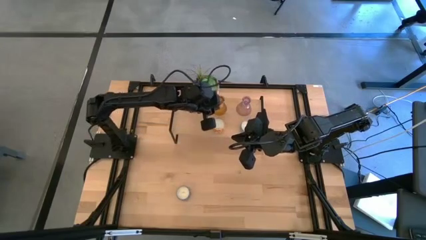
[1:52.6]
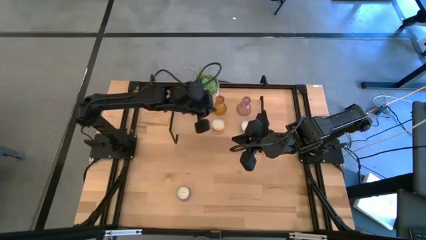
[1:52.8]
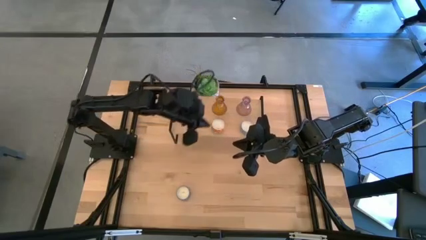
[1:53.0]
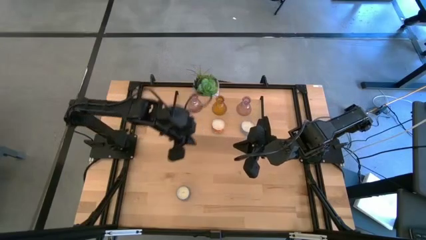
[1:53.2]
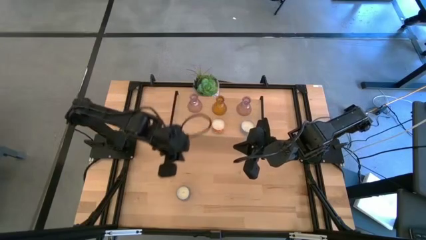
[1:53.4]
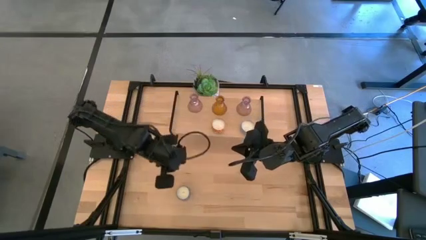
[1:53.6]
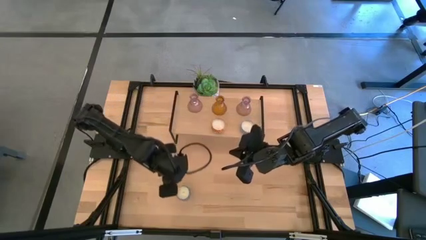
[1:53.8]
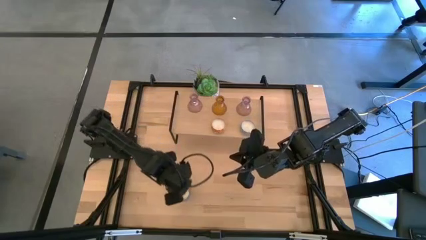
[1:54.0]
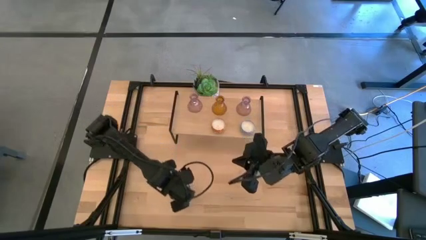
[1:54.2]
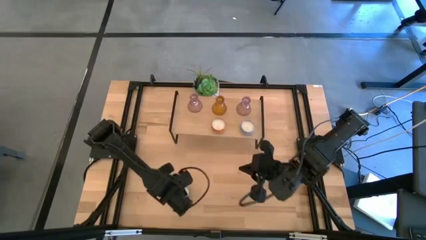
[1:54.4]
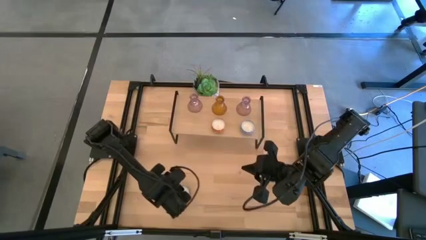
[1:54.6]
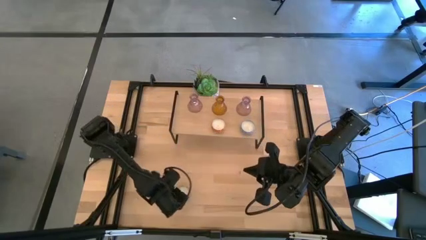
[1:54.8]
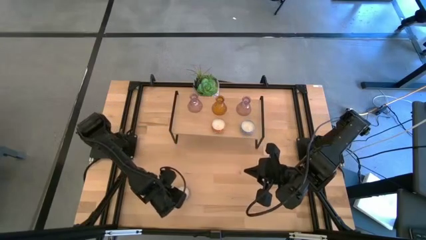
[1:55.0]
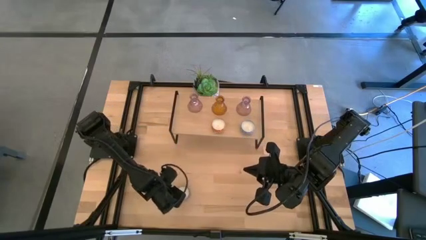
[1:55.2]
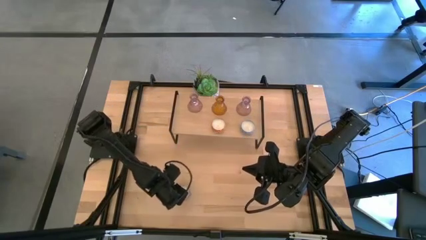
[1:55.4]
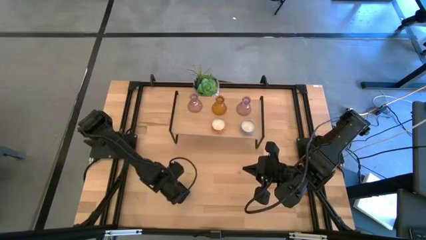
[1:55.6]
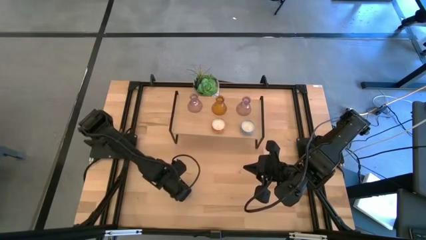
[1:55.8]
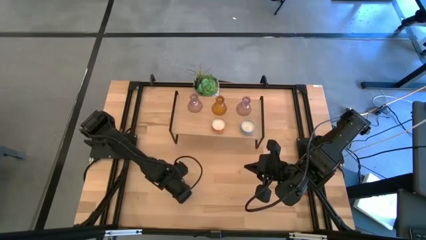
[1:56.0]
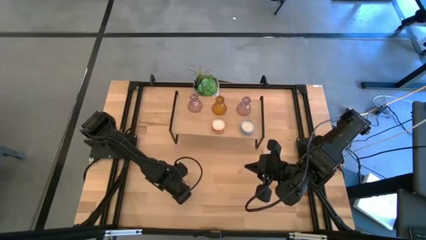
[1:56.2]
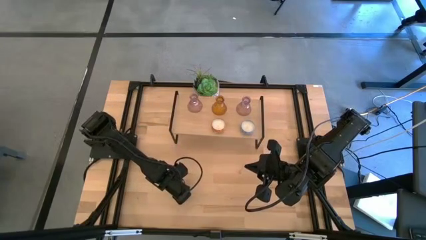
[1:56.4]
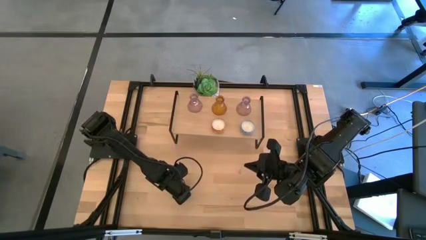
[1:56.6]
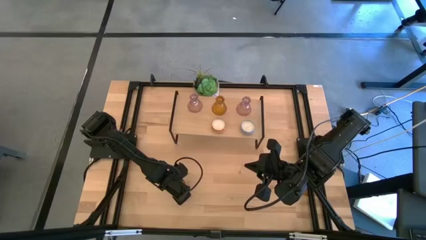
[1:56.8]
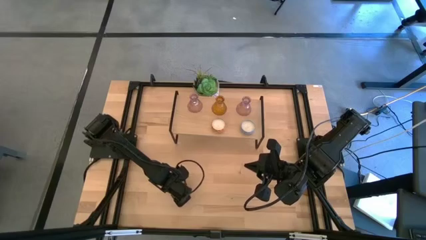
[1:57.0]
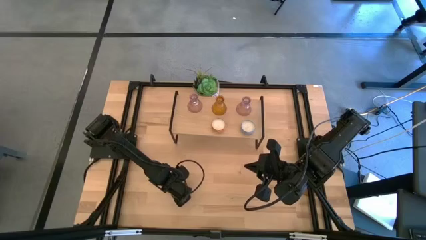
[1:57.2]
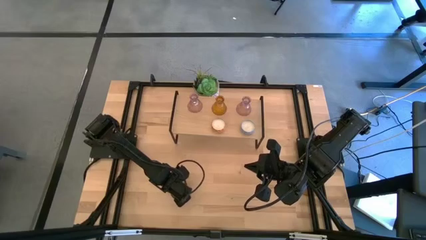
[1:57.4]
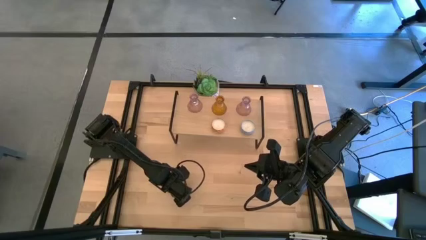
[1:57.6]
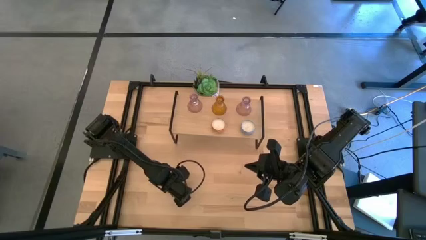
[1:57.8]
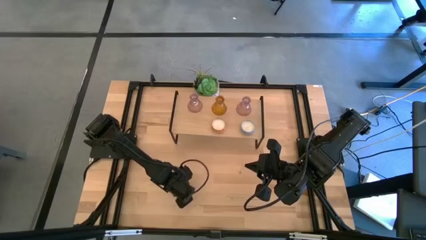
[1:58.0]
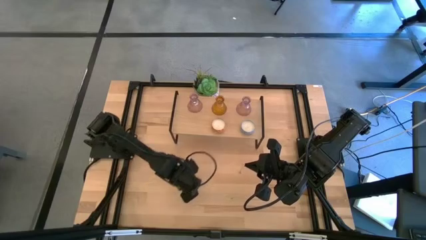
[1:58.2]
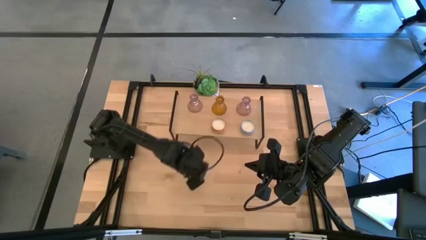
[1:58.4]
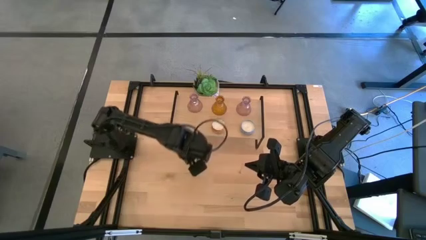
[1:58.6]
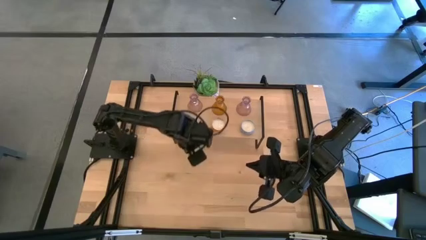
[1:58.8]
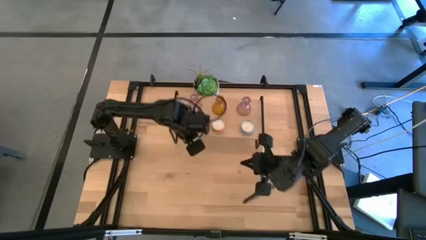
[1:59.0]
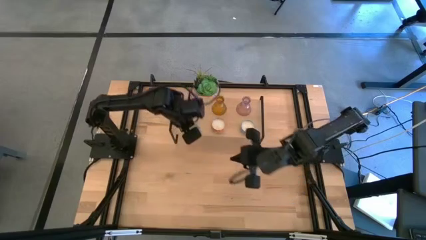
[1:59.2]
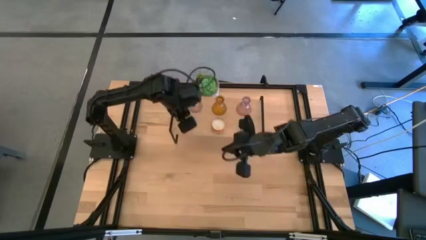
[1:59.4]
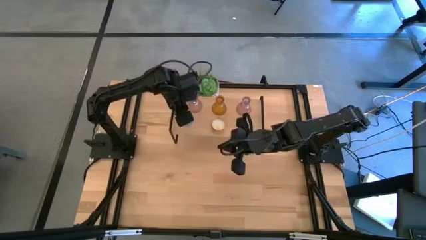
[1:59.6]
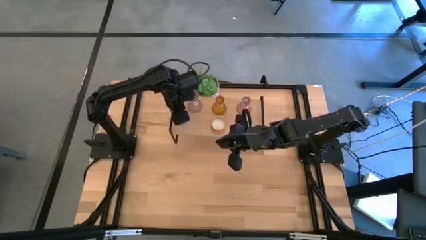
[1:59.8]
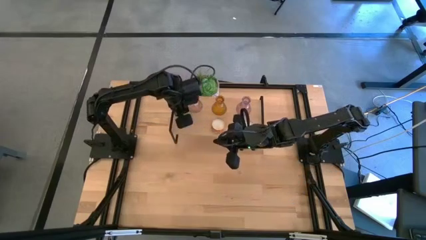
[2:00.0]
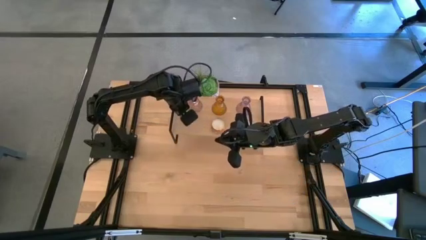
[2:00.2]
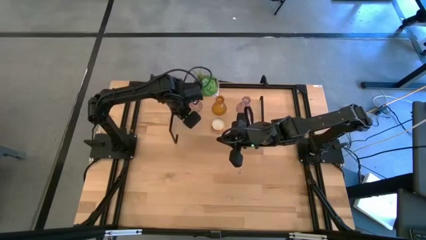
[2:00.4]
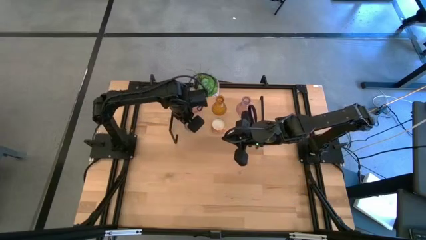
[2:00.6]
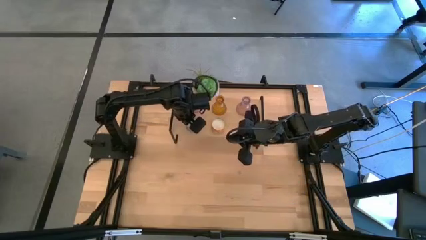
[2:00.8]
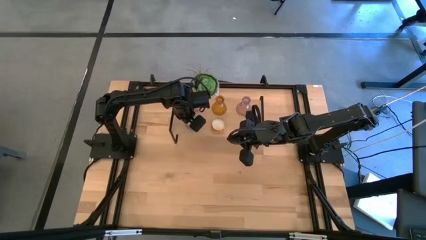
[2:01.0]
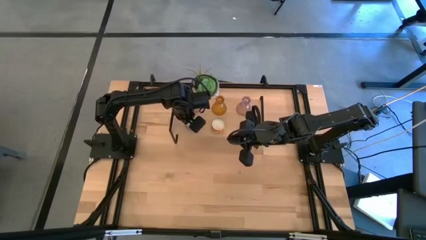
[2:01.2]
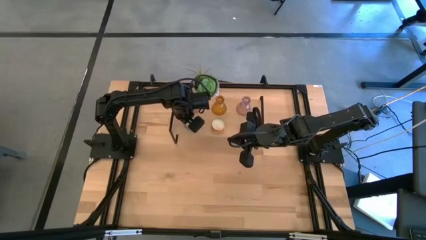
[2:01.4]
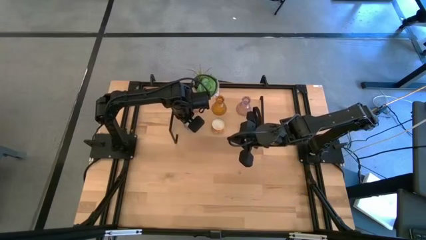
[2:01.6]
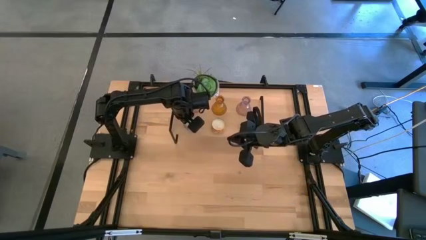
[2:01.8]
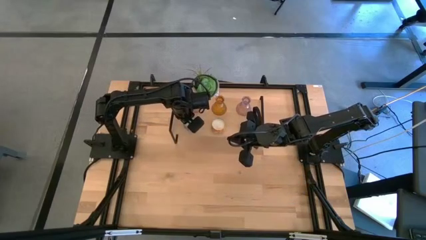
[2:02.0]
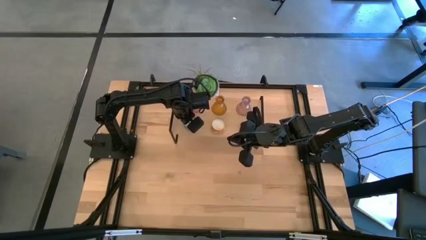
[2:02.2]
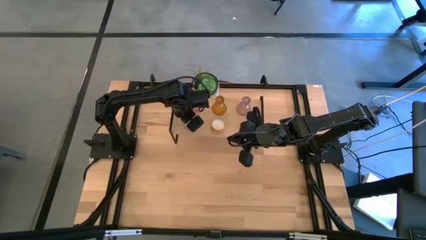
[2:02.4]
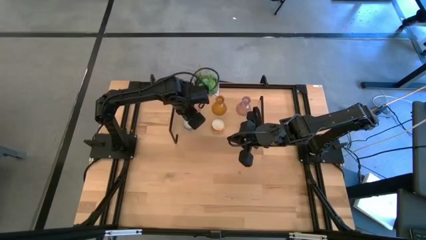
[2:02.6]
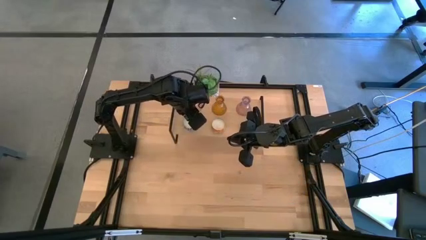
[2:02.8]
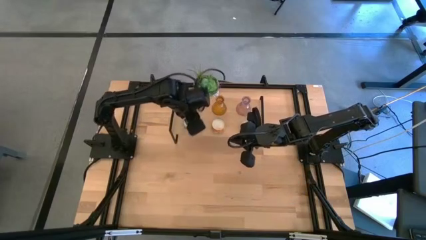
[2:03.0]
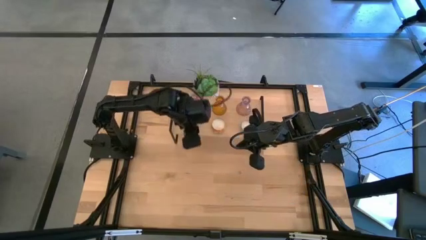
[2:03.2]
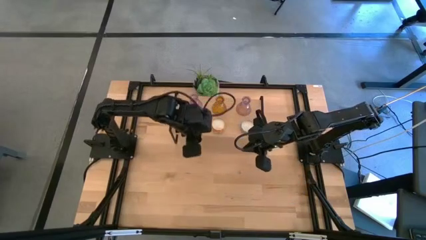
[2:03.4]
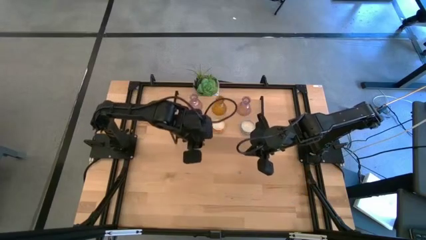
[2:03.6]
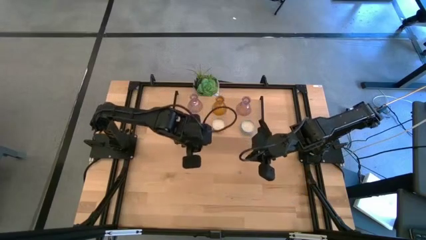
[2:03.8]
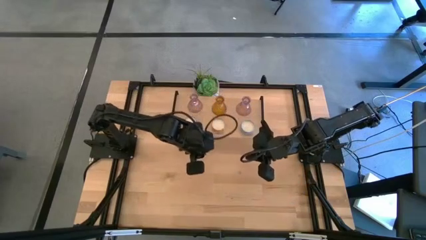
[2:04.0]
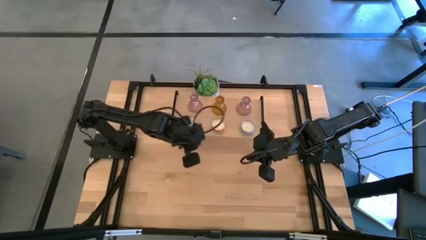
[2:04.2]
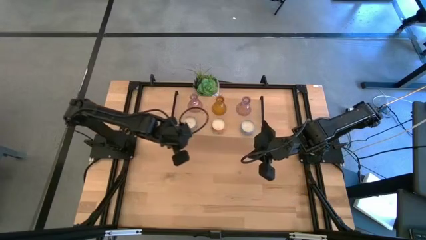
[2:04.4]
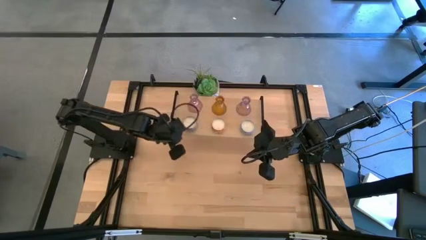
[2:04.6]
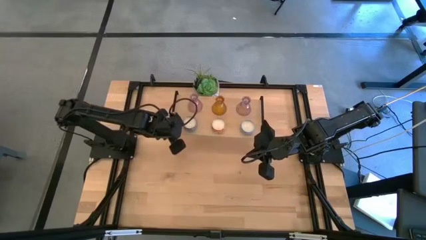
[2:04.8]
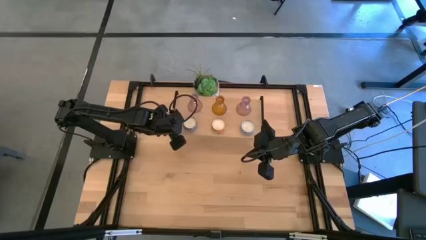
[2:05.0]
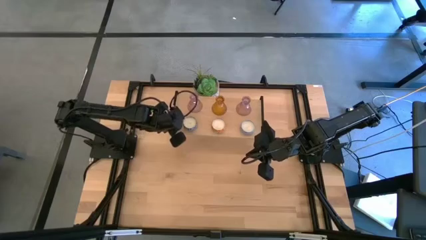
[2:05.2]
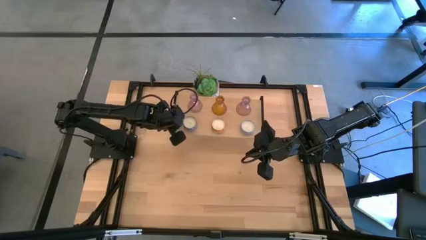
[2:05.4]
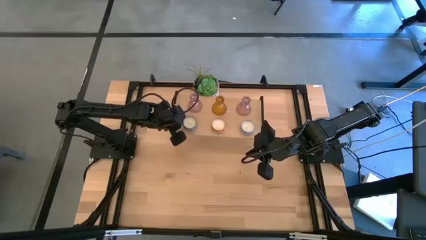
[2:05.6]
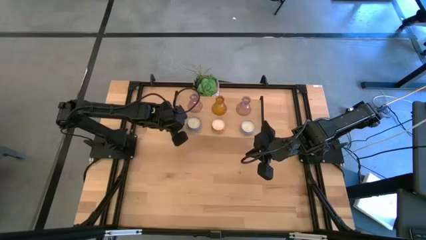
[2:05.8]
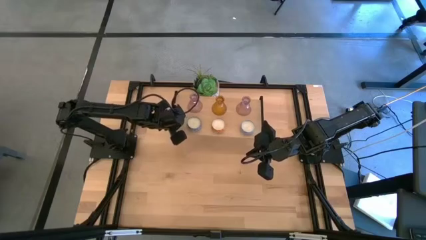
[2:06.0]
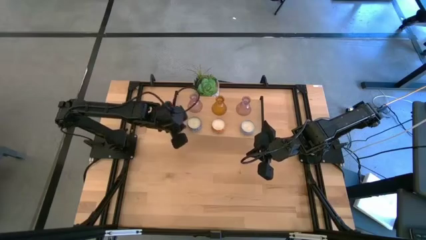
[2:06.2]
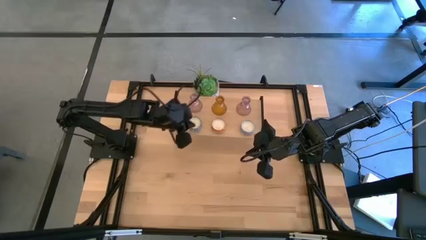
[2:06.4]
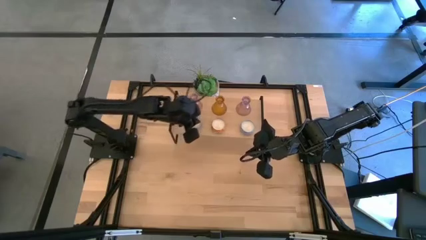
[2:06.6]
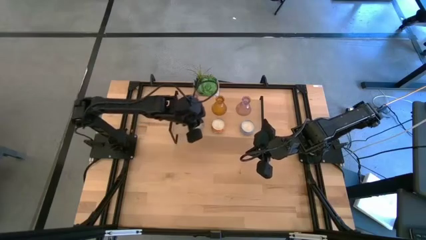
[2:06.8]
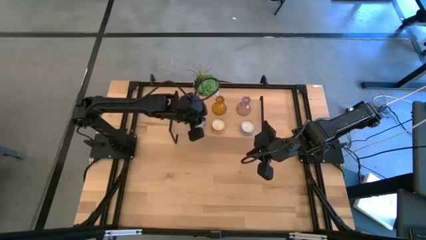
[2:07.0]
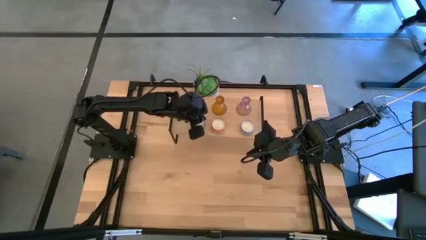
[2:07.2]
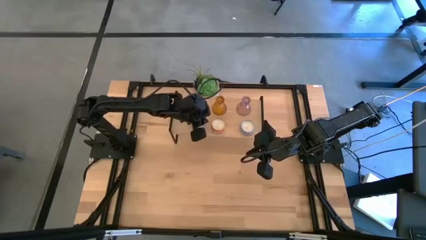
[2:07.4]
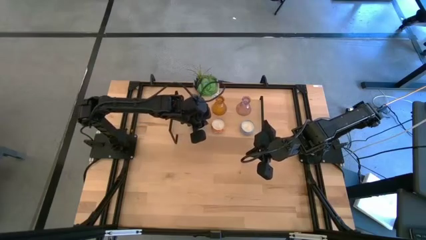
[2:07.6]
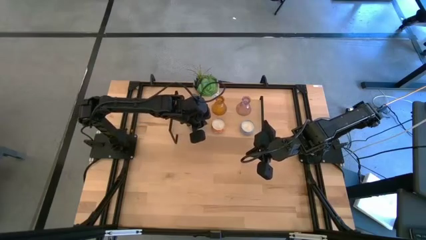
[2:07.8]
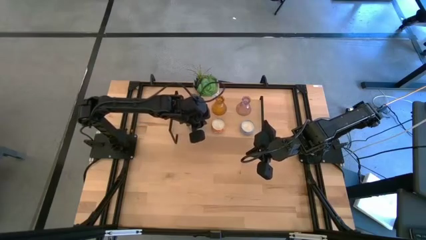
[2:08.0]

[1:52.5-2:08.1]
Task: Pick & Place candle stick holders
Put the blue candle on the shelf aligned with the left violet candle holder
